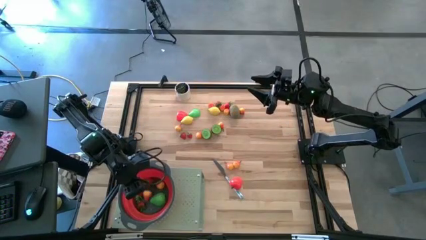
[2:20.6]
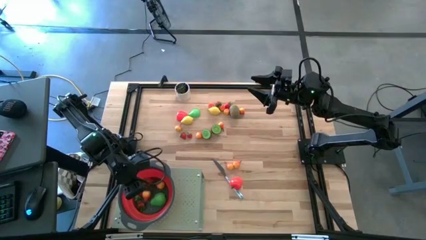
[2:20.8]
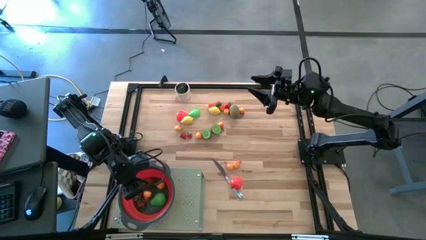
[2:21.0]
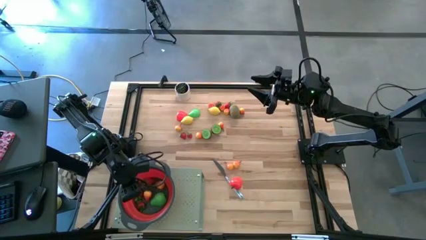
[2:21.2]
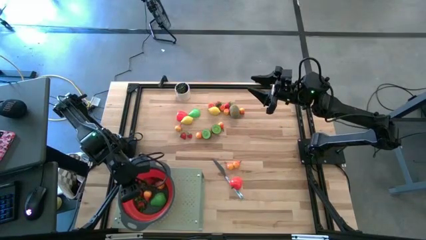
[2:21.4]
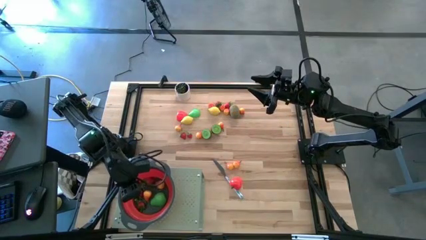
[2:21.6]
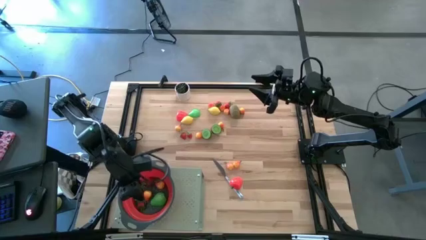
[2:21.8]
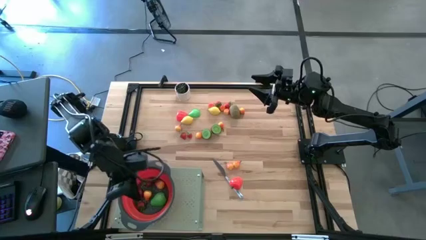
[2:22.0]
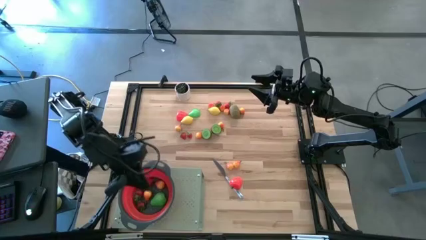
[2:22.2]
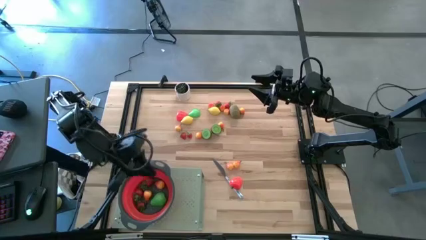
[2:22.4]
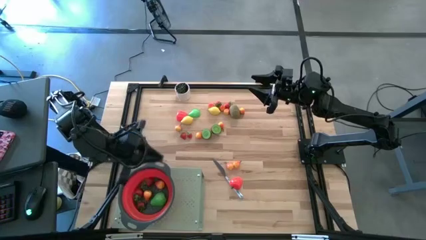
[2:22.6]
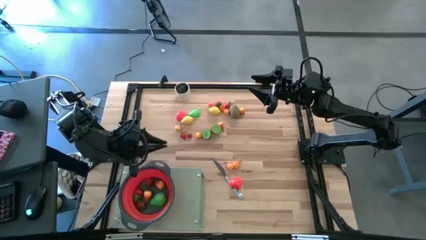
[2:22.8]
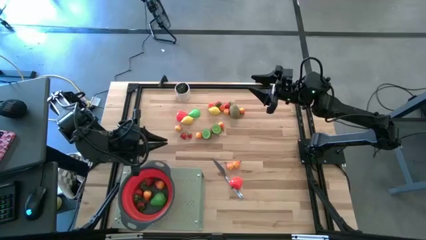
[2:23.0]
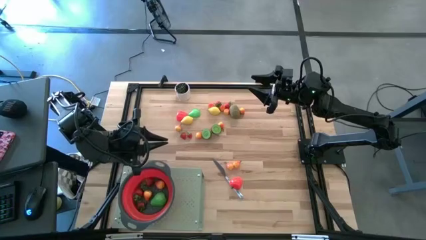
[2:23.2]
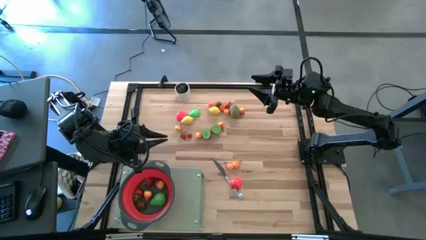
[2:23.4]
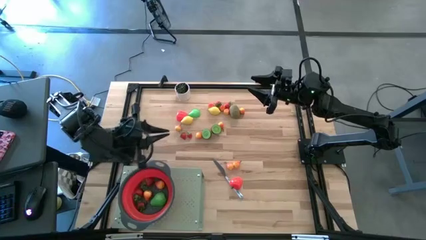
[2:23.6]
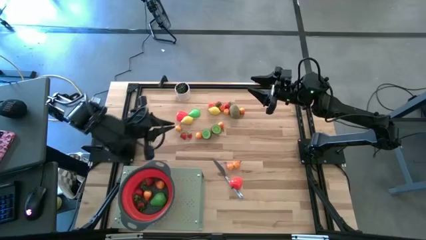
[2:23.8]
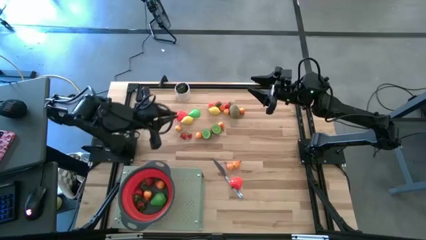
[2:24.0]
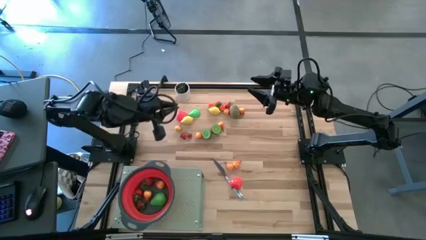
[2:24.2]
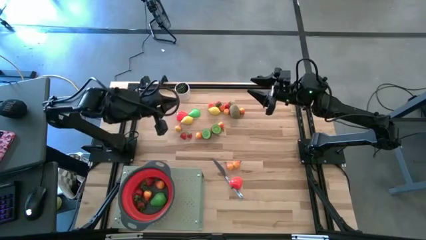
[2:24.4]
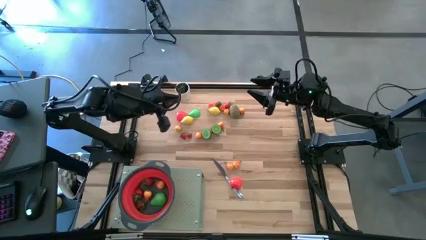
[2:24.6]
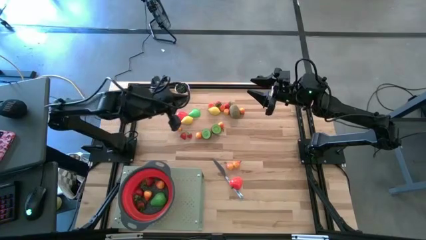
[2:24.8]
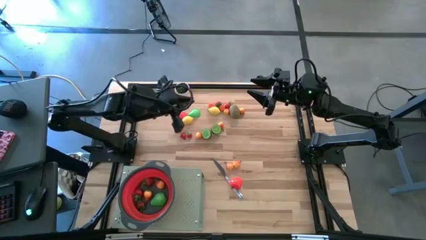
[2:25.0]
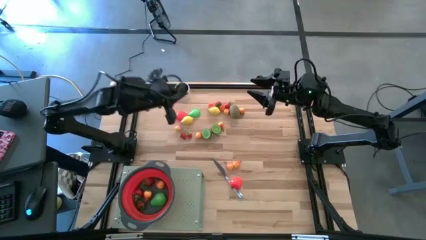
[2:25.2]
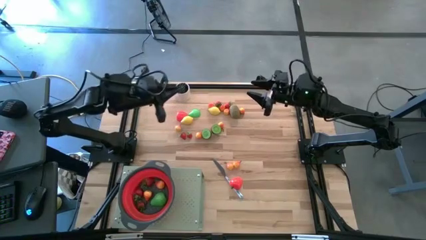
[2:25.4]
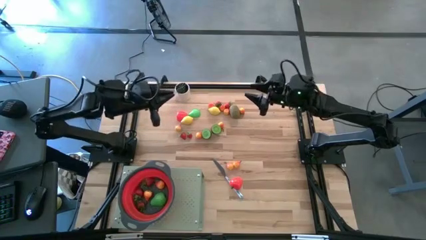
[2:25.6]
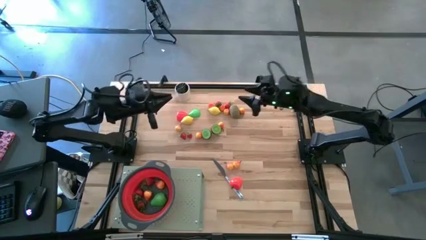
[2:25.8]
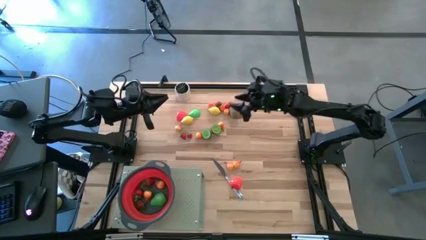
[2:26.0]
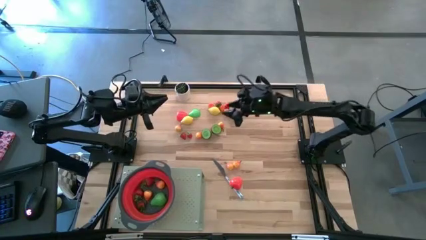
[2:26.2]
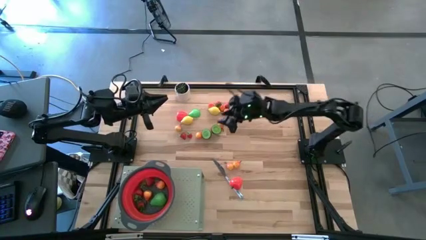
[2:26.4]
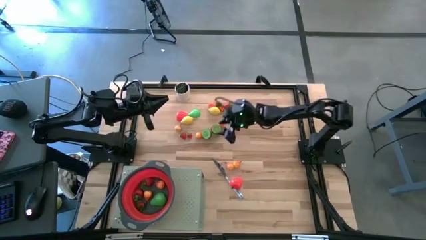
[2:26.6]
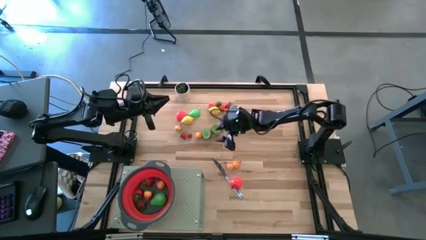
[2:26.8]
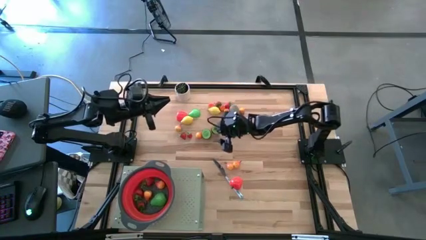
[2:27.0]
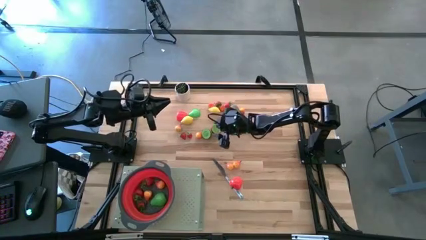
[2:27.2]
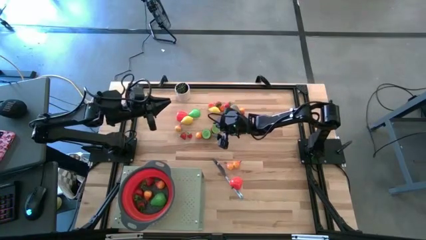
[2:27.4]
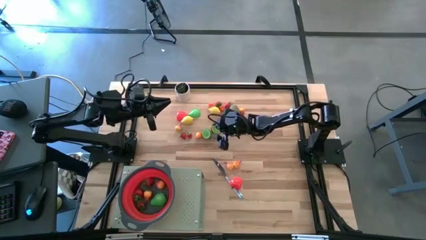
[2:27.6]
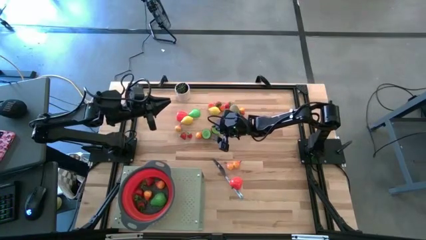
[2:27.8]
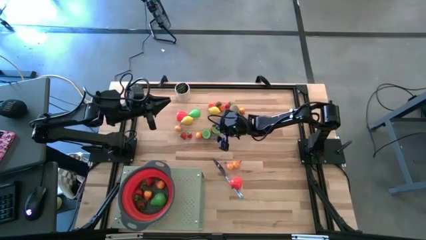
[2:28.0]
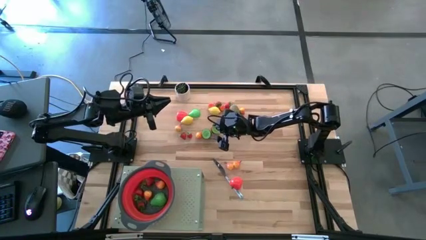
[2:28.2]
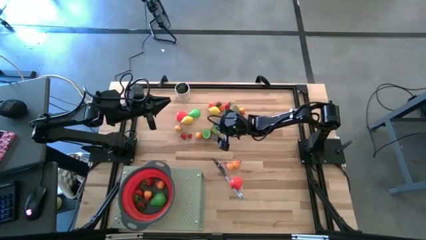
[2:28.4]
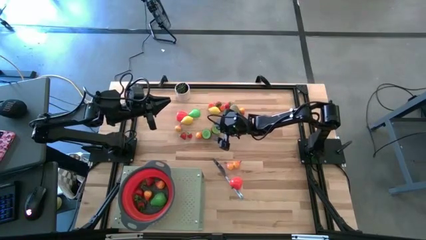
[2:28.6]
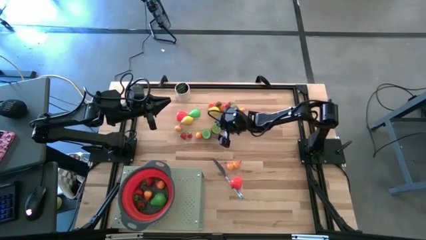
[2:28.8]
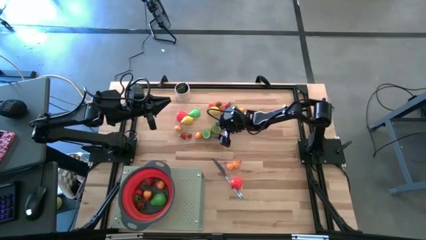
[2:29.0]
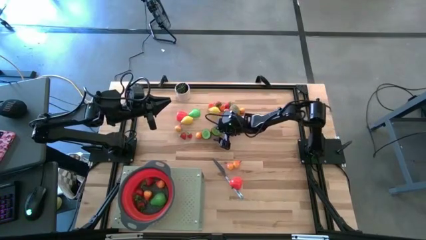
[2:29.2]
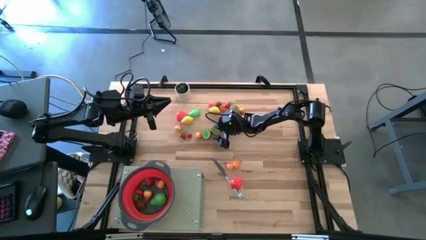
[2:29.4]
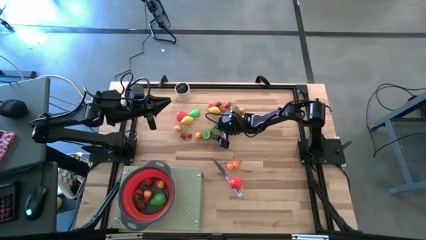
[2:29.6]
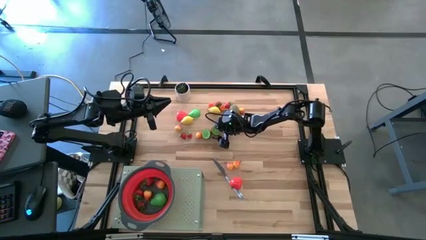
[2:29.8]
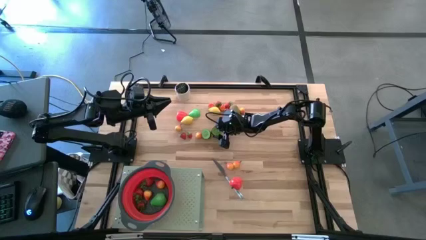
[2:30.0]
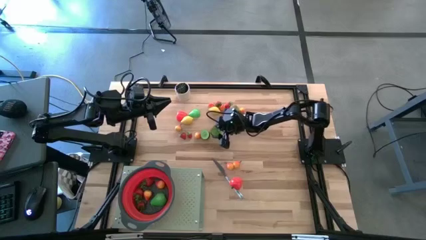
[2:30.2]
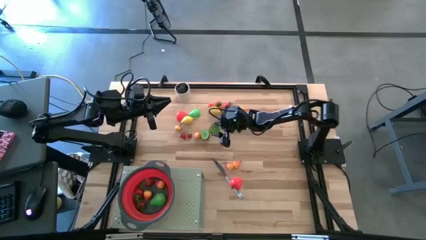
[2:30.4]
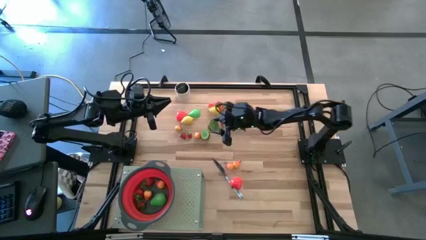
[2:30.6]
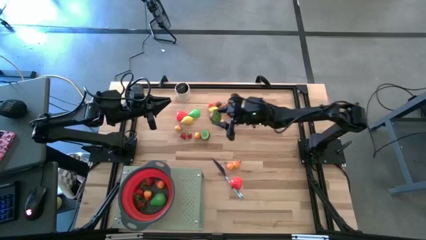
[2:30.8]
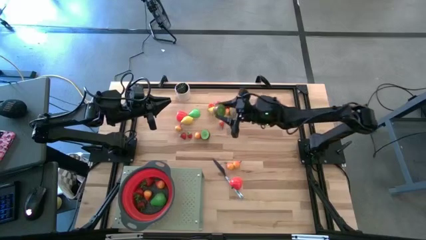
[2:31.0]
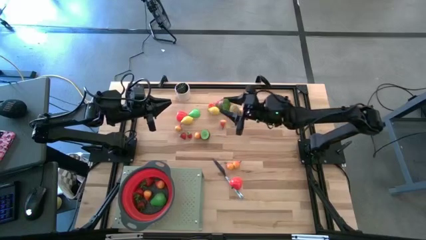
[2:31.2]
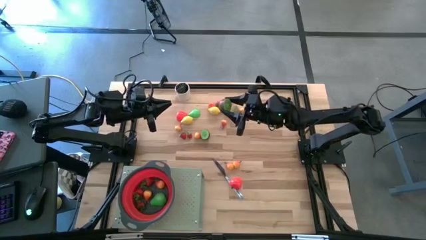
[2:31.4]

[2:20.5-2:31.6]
Task: Pick & Place Fruit
Put the half kiwi into the red strainer bowl on the shelf

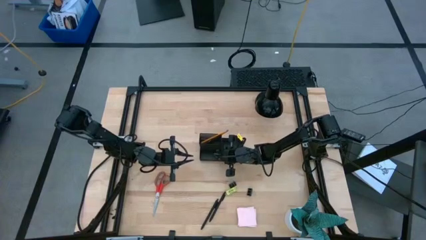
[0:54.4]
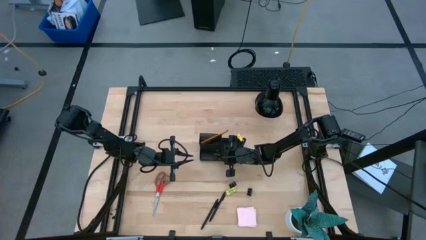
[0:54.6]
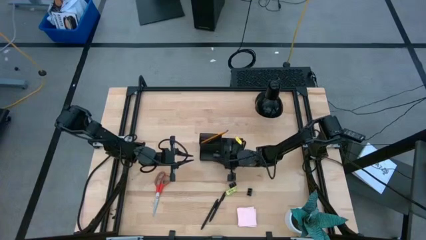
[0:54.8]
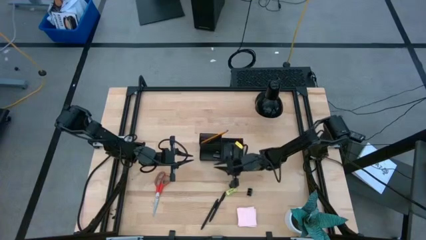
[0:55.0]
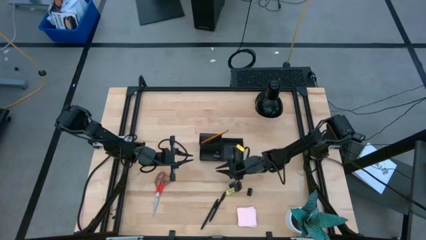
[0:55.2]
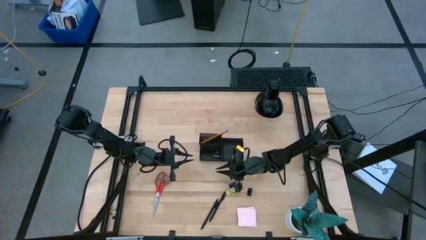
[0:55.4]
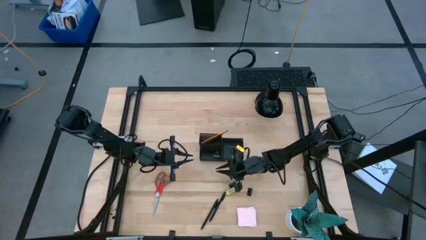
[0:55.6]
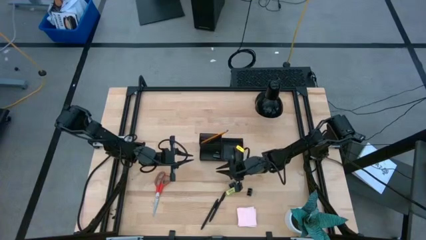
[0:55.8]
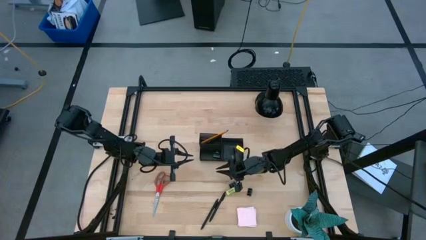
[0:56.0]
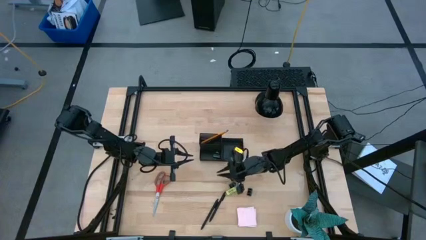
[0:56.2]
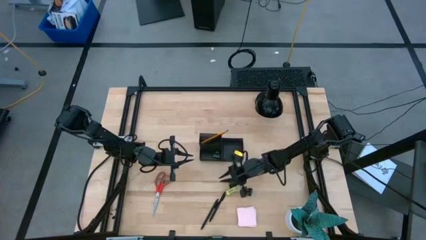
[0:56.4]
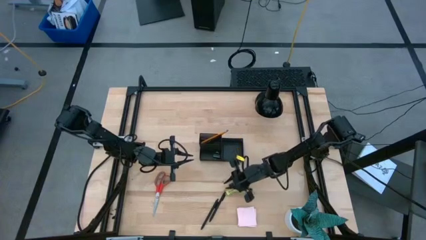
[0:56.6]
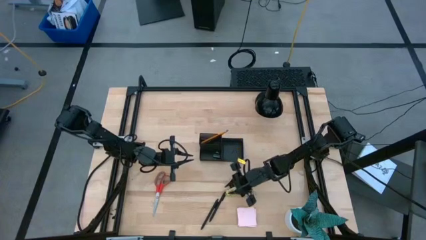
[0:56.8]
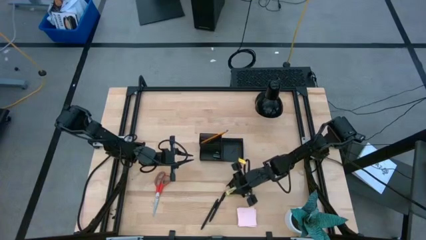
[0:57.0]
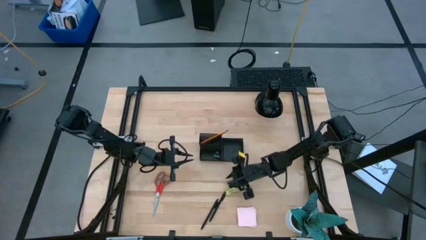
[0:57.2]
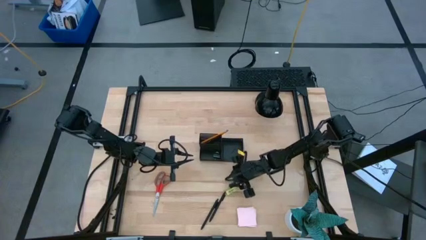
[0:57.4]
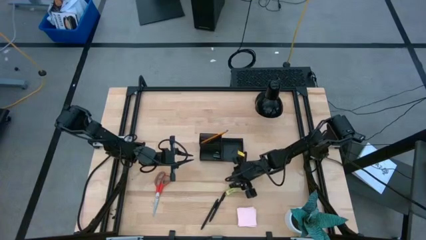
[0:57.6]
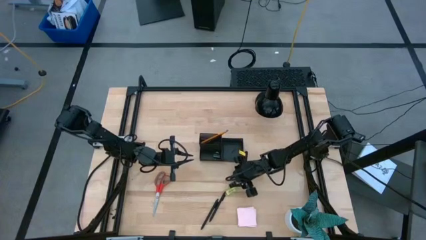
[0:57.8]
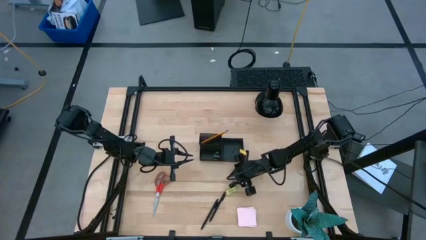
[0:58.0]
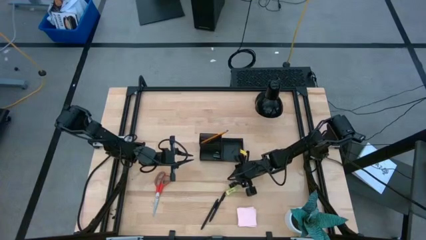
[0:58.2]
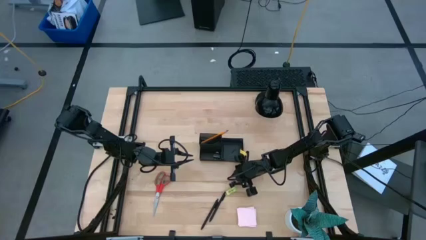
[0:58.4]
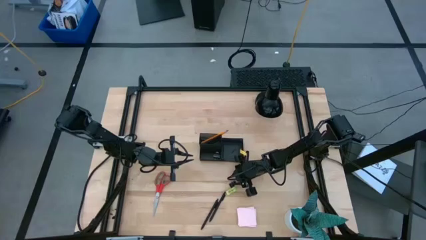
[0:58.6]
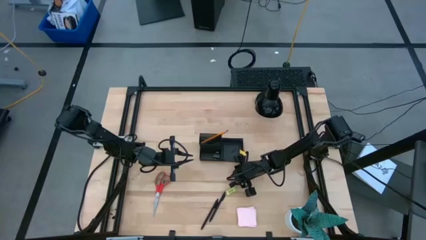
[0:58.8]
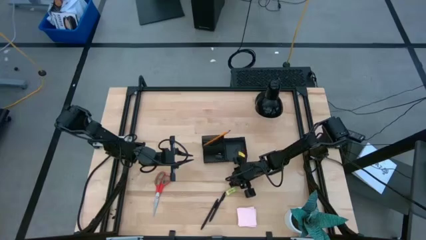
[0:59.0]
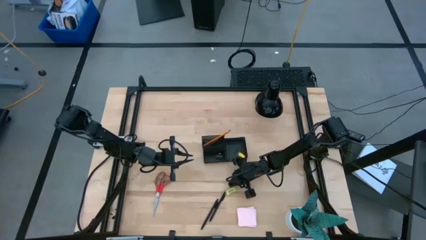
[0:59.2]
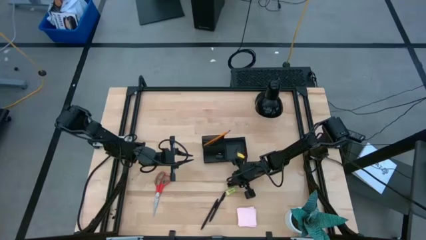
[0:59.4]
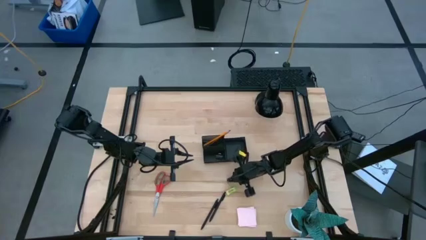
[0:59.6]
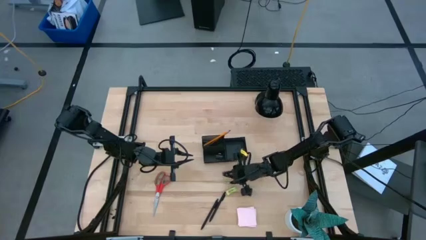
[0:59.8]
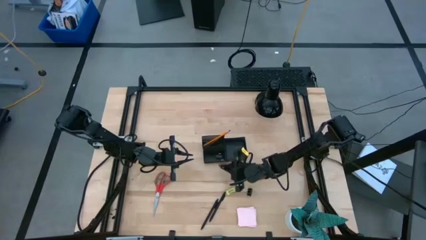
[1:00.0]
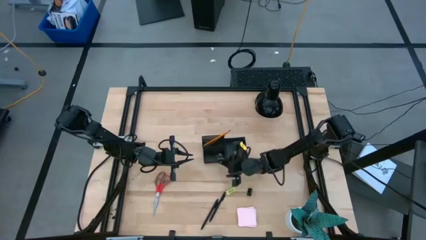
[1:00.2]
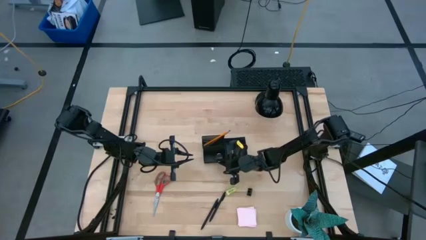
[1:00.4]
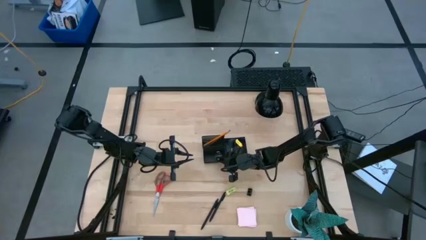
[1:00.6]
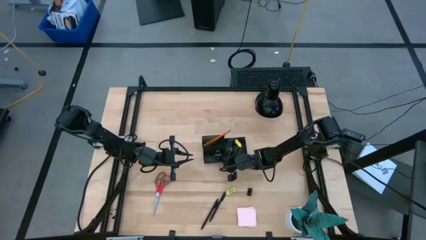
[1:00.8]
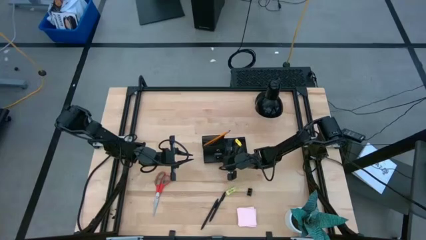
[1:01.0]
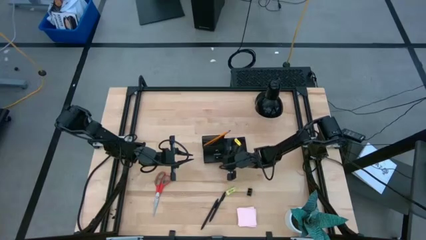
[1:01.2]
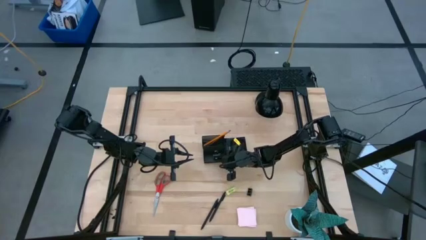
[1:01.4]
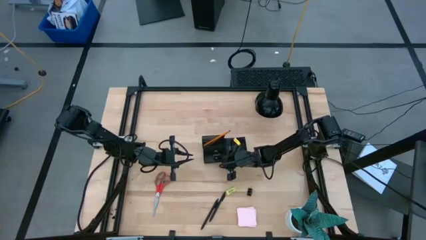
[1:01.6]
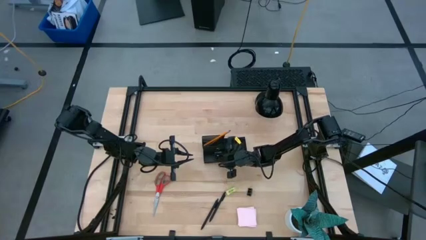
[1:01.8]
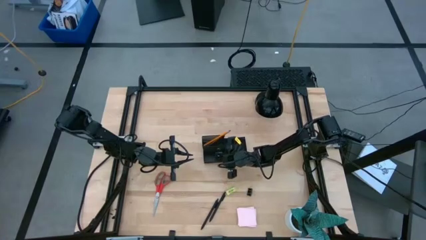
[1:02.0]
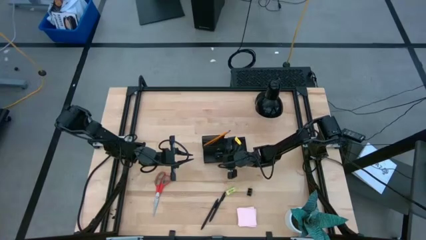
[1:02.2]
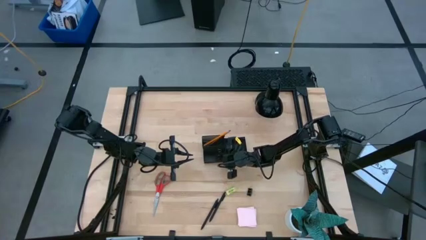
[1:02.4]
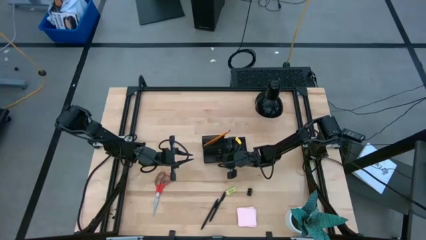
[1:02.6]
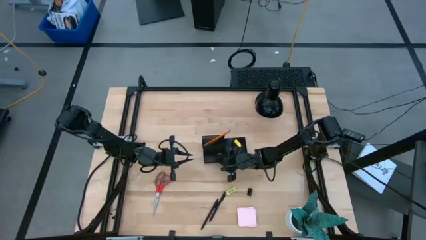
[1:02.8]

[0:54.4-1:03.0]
Task: Pick and place office supplies into organizer
Put the black binder clip into the black desk organizer
